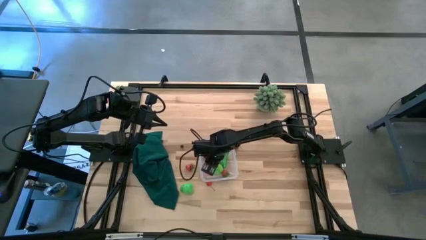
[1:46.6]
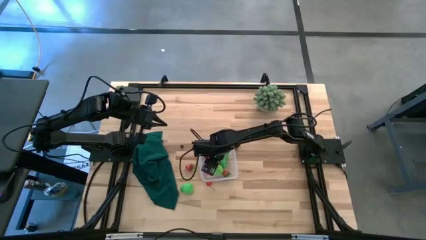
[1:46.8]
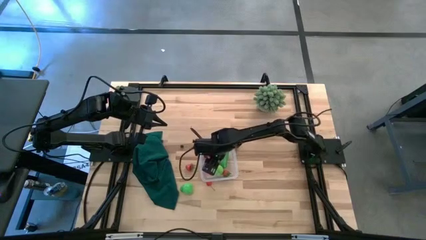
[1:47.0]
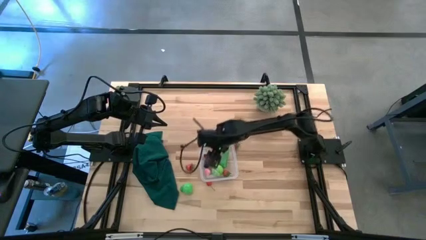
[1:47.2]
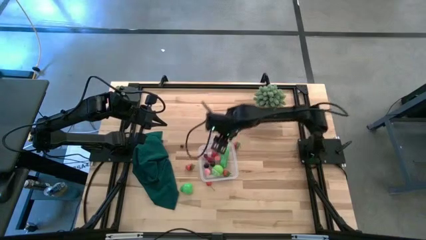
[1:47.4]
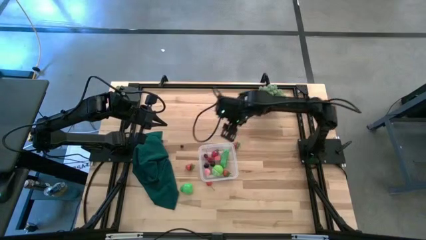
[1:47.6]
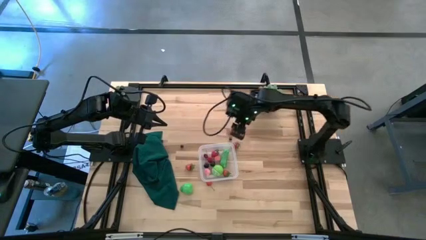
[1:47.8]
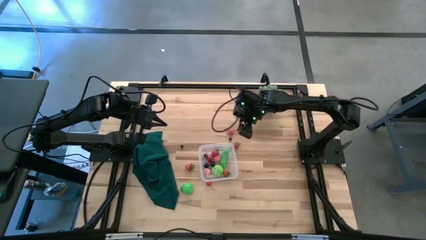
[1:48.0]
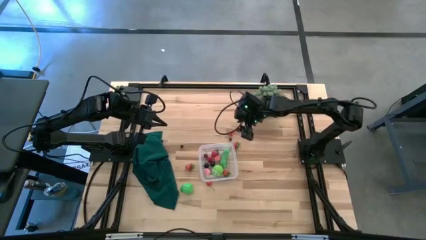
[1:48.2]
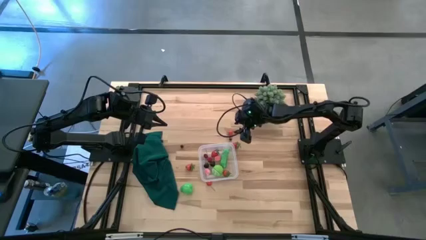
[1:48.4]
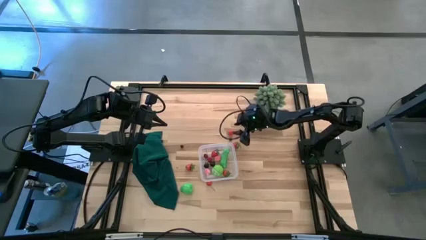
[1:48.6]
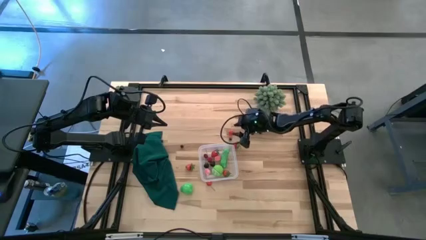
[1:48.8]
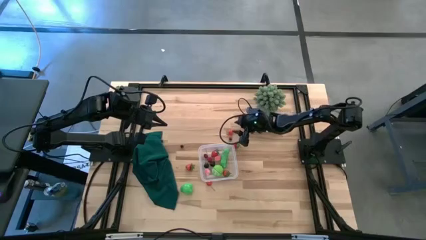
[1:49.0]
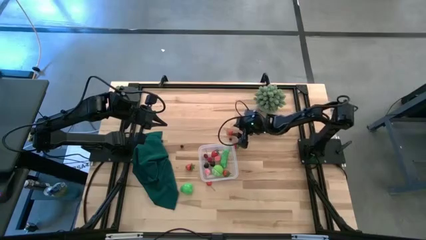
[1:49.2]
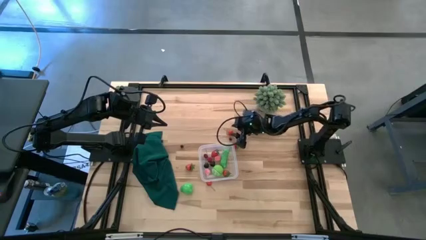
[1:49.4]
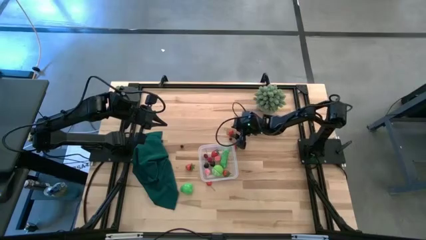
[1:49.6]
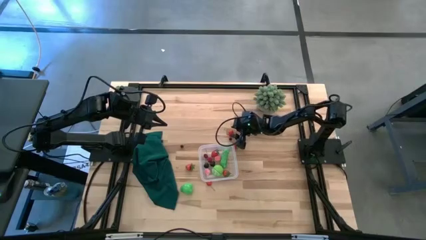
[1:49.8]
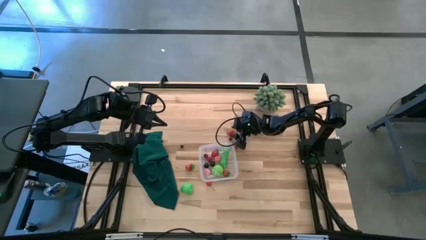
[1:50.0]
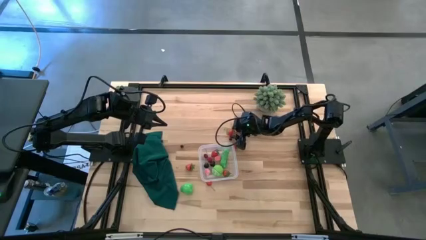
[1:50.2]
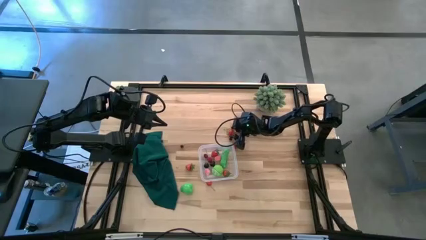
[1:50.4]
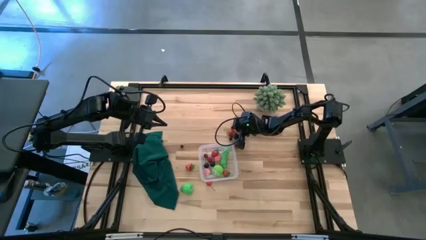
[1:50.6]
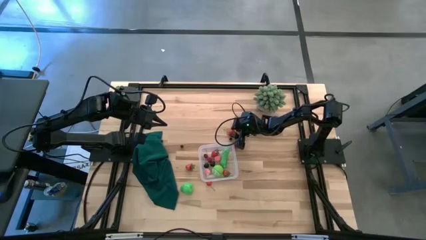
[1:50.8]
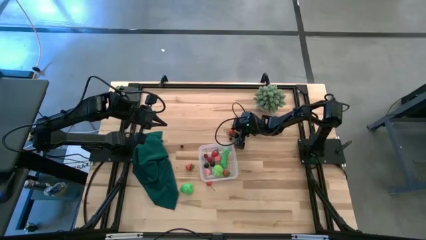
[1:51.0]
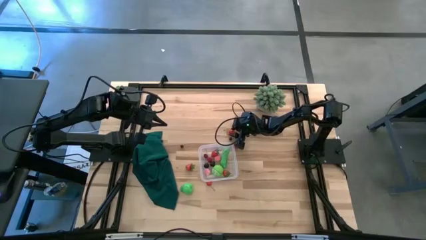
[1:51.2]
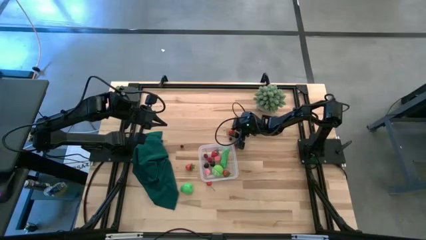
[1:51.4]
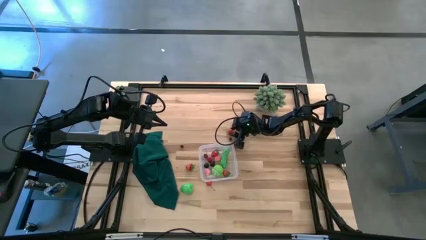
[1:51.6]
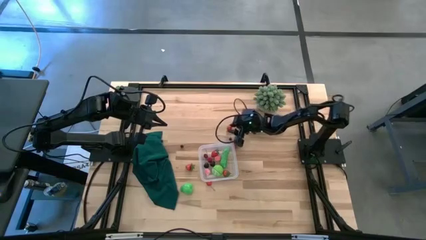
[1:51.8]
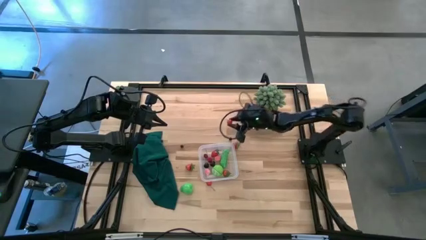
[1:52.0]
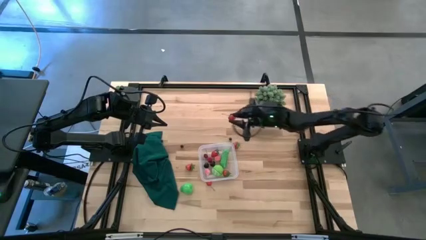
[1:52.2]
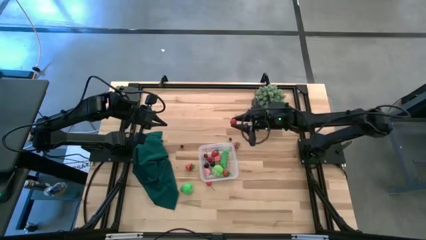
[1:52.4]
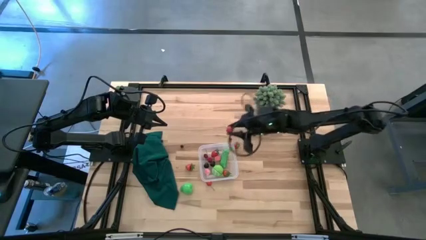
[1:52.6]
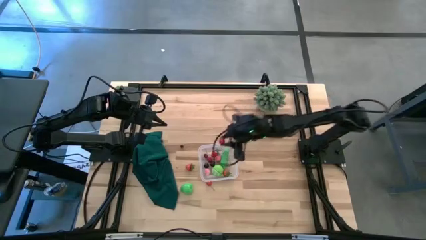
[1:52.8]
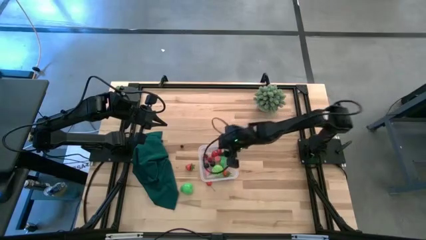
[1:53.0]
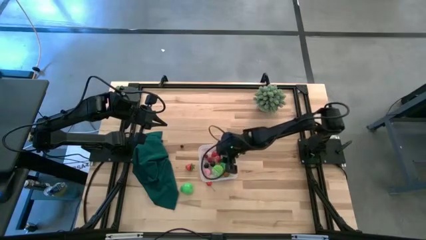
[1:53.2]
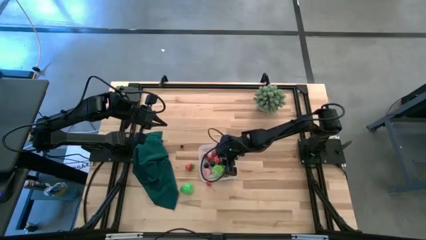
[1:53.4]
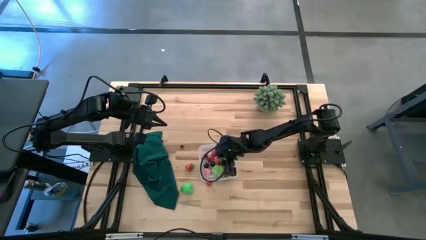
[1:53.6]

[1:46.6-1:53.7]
Task: Pick and placing Produce into tupperware
Put the red cherry into the transparent bin

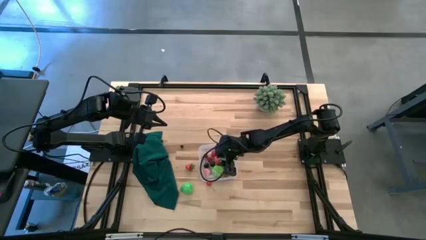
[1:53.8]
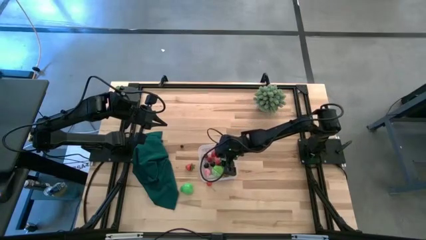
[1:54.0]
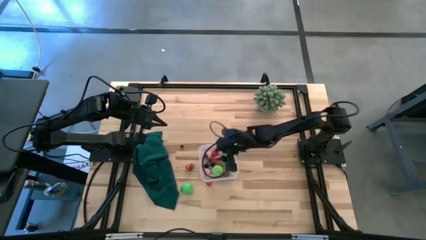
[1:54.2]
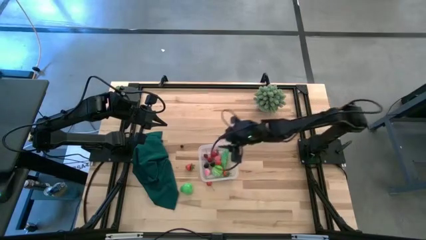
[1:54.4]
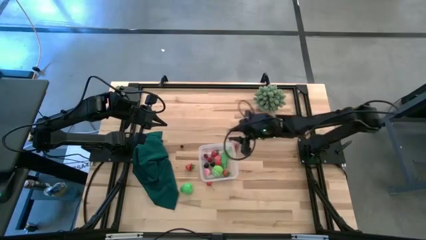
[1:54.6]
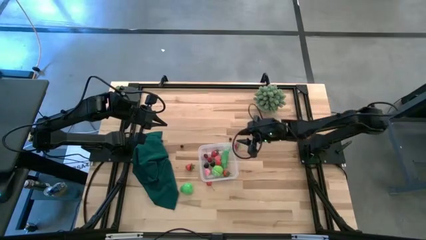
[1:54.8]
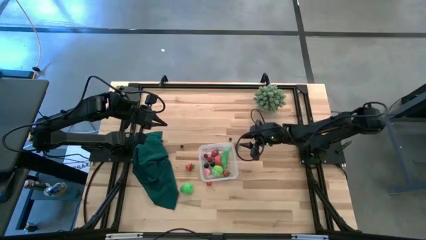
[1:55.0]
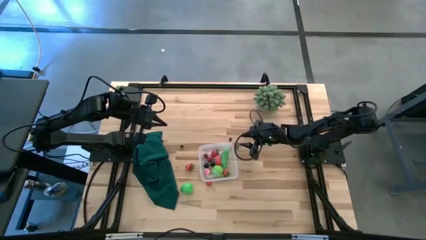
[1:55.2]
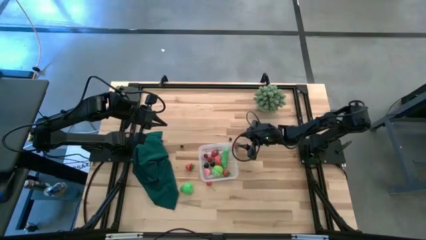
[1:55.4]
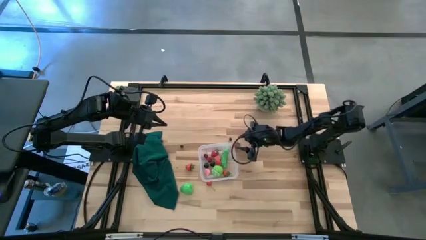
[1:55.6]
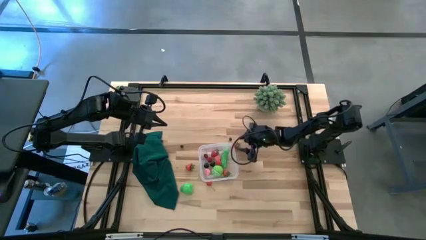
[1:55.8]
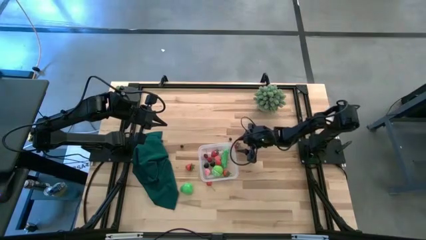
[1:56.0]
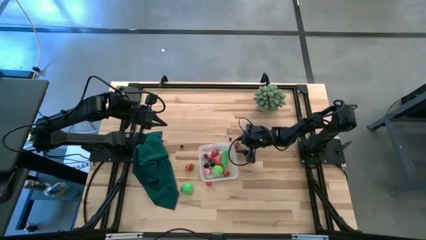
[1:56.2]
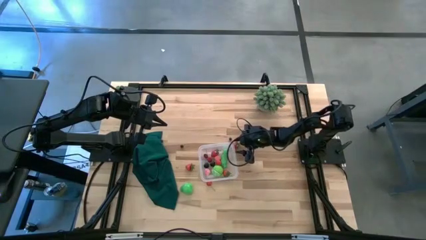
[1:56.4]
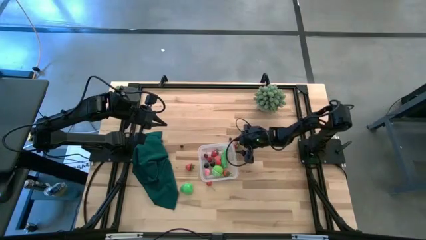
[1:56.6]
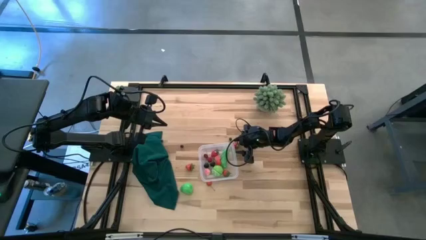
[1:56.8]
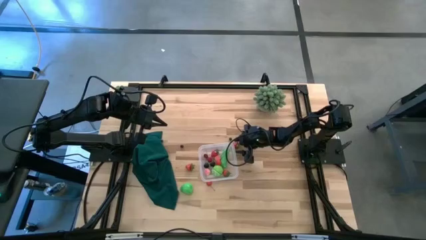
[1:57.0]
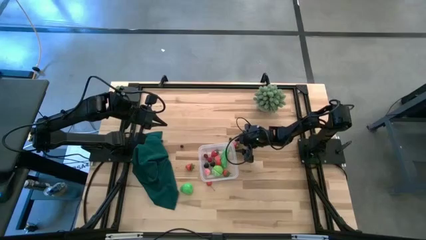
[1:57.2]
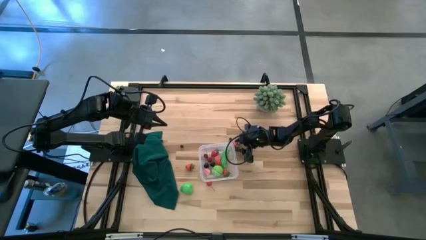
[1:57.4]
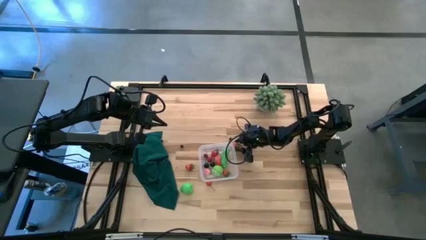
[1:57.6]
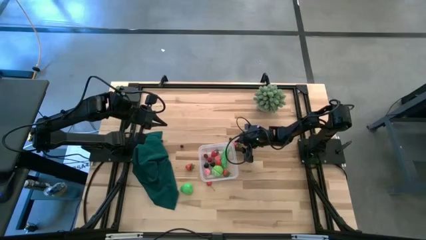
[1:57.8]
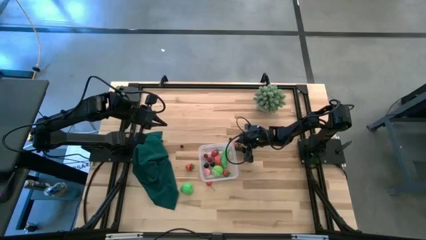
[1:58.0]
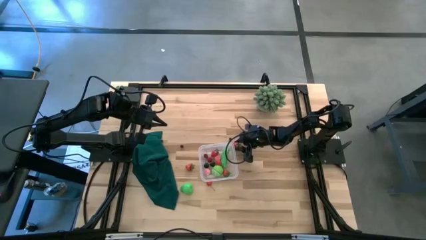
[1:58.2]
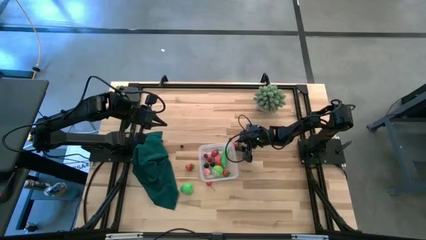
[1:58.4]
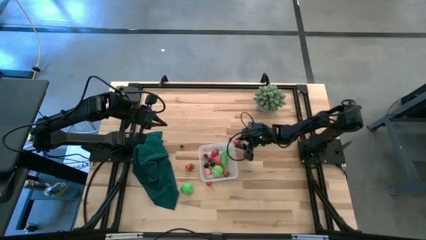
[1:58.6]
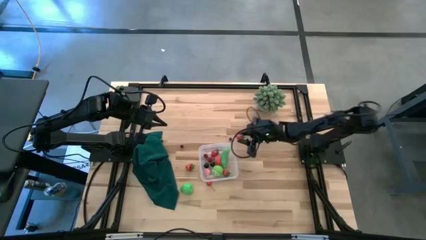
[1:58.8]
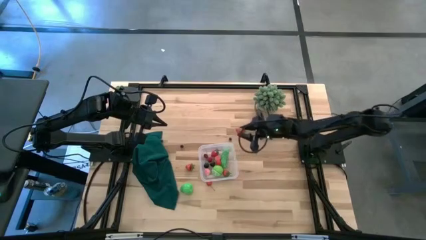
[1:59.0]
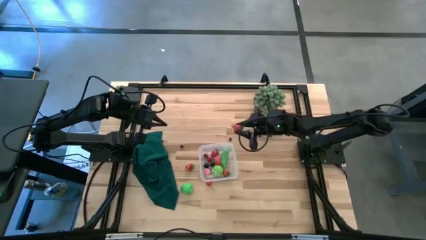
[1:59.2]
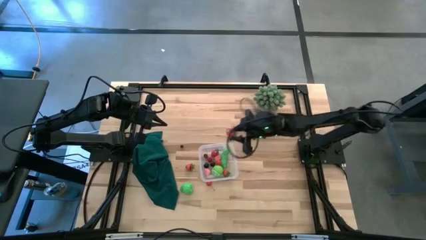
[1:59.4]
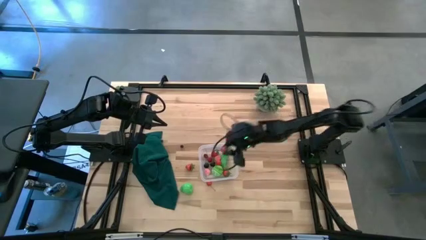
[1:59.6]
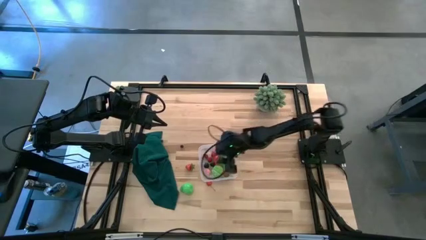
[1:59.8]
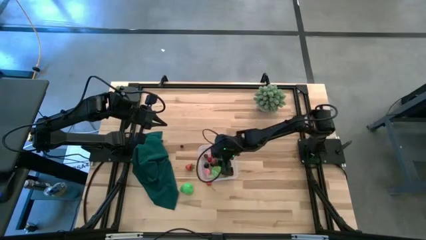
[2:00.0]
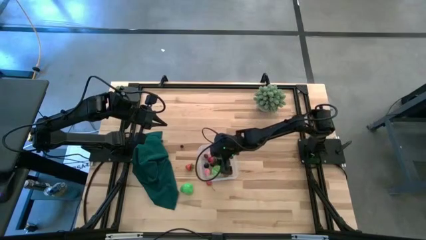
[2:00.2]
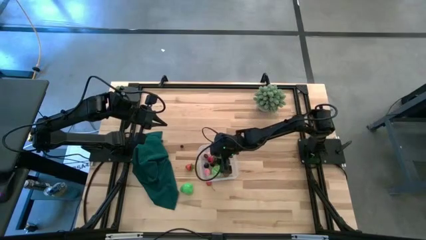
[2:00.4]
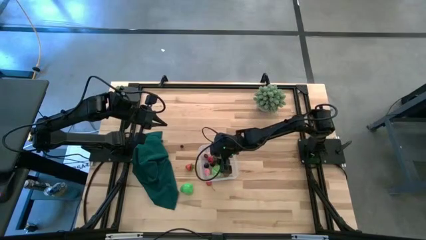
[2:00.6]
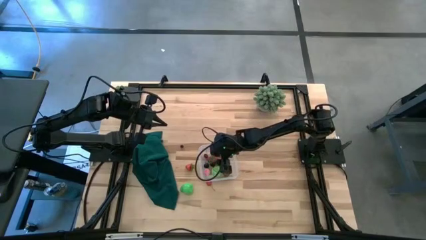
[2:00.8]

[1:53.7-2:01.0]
Put the red strawberry into the transparent bin

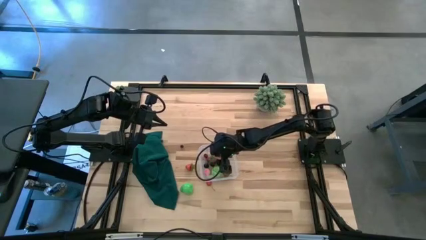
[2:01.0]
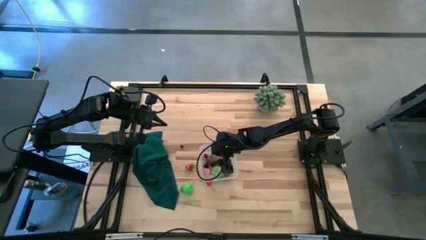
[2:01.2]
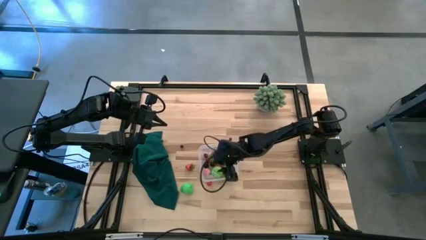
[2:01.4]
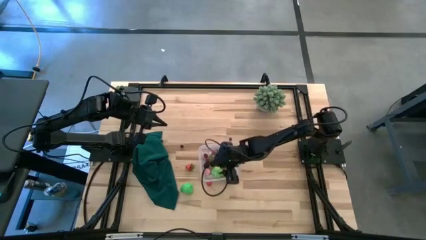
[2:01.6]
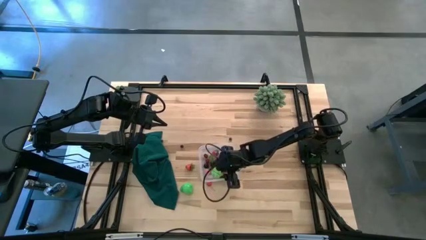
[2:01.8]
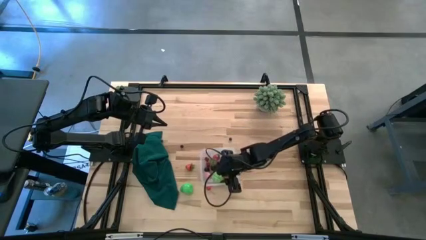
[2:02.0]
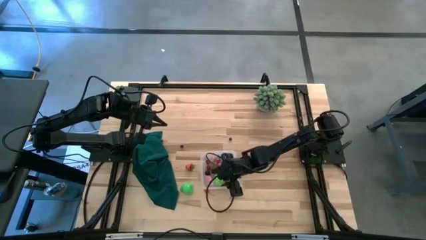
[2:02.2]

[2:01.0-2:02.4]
Adjust the transparent bin on the table
